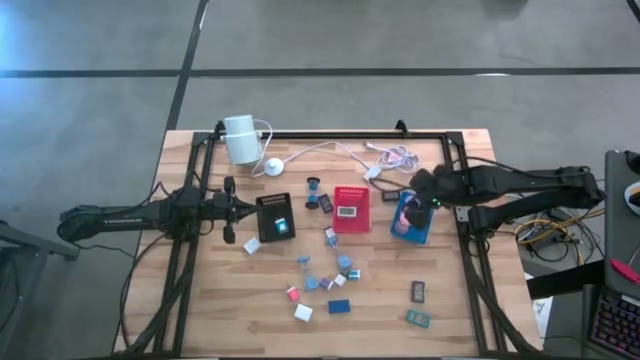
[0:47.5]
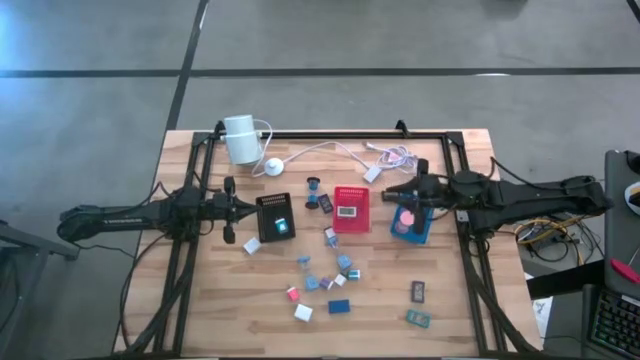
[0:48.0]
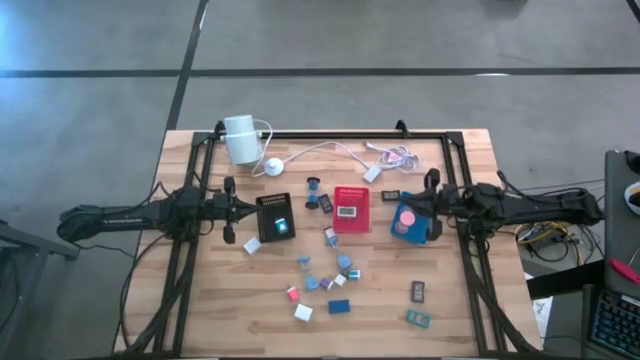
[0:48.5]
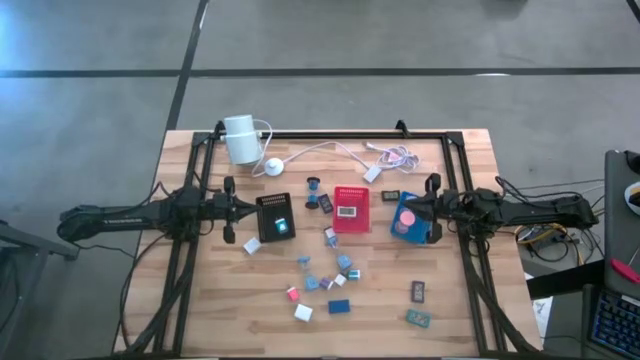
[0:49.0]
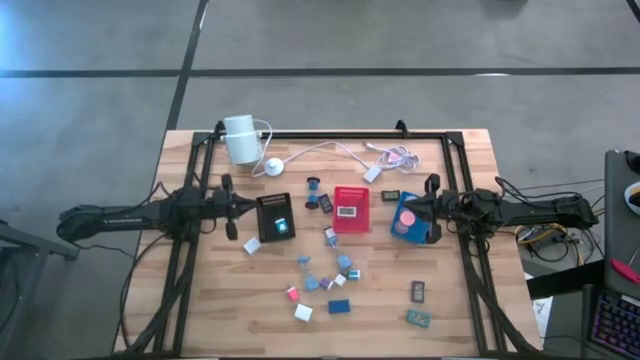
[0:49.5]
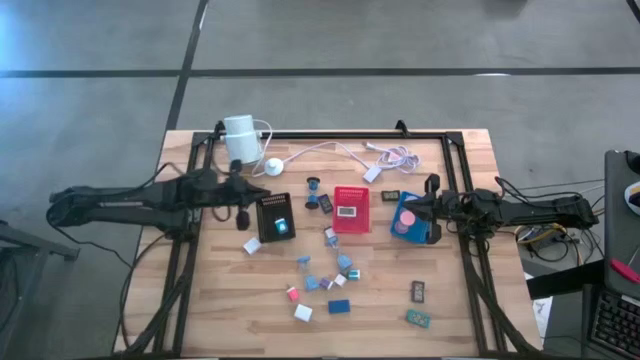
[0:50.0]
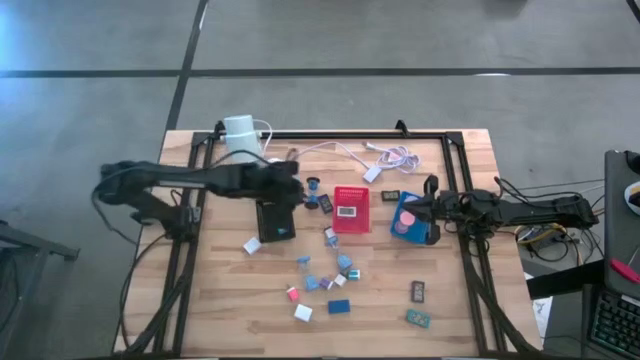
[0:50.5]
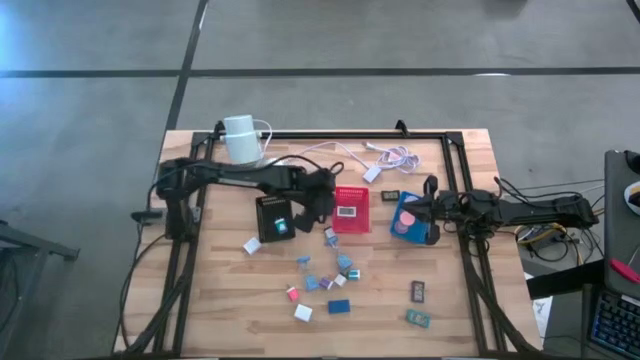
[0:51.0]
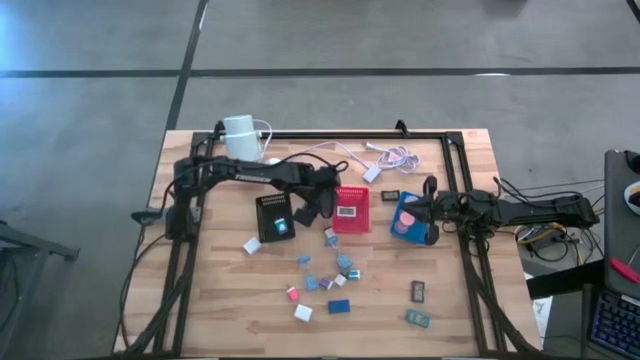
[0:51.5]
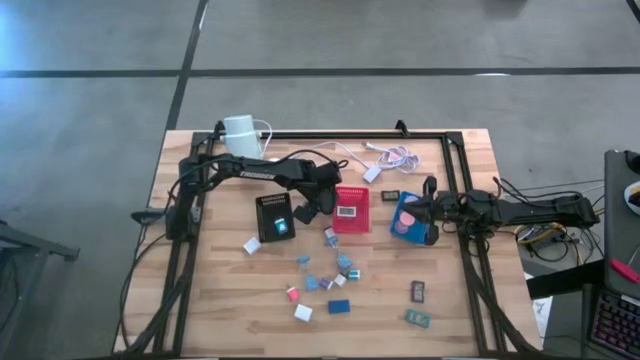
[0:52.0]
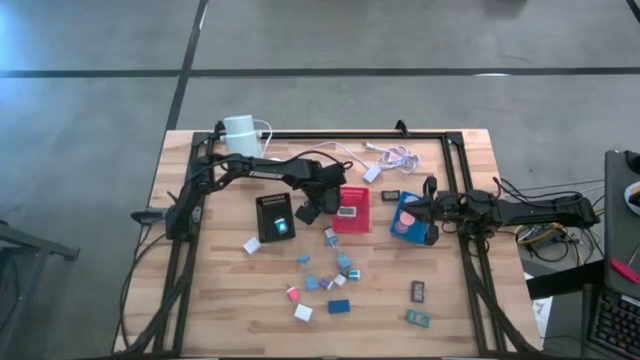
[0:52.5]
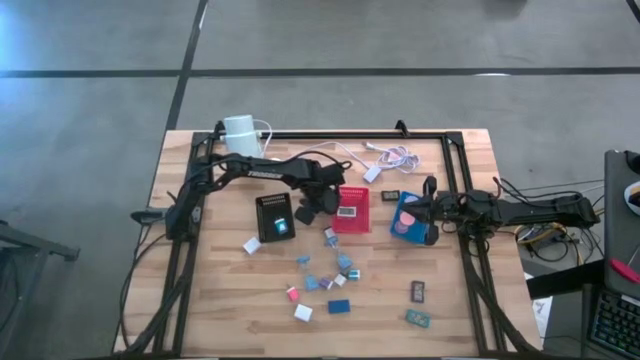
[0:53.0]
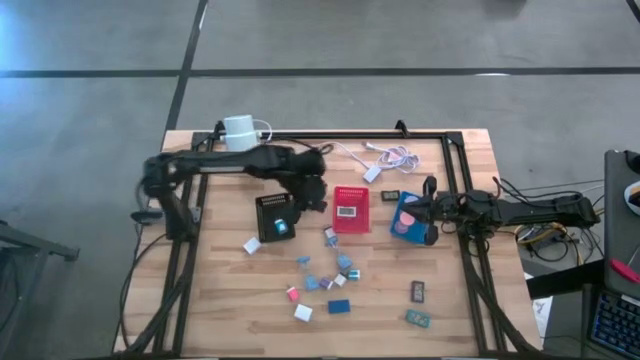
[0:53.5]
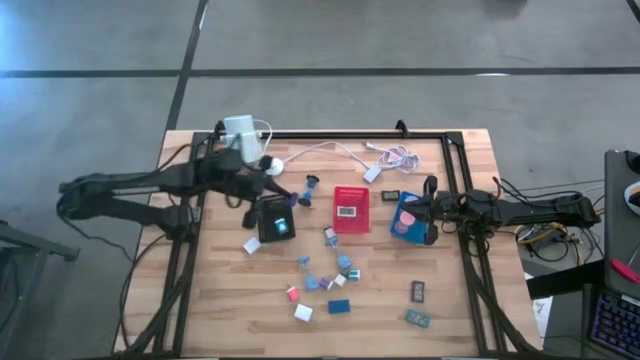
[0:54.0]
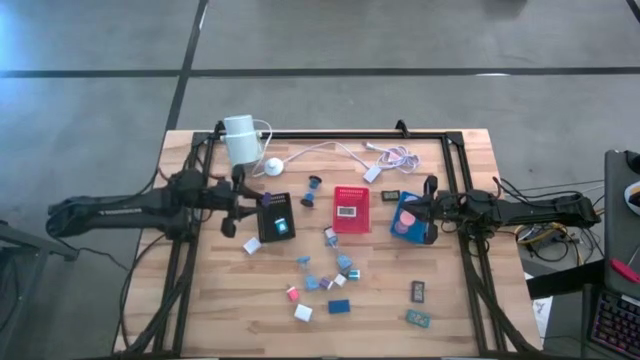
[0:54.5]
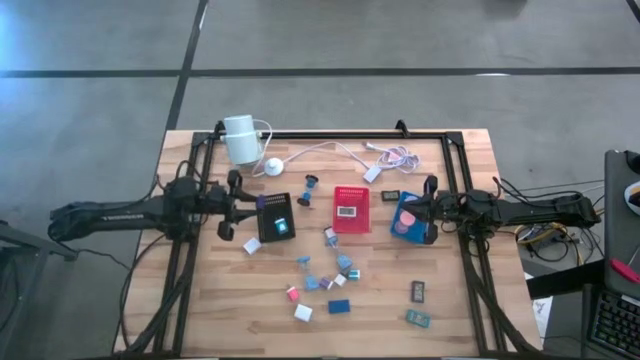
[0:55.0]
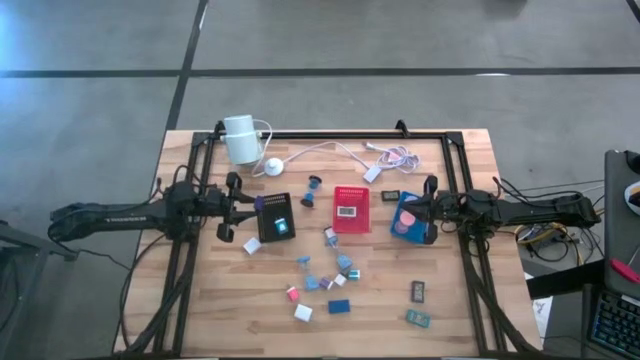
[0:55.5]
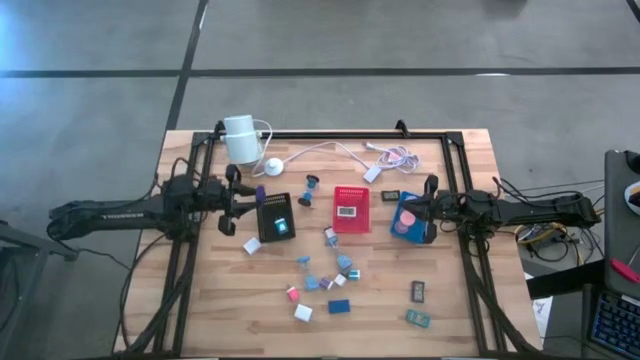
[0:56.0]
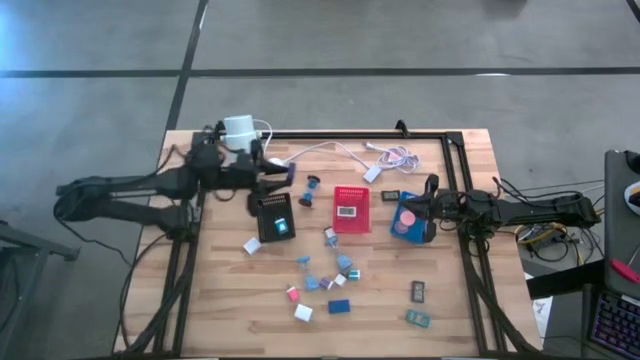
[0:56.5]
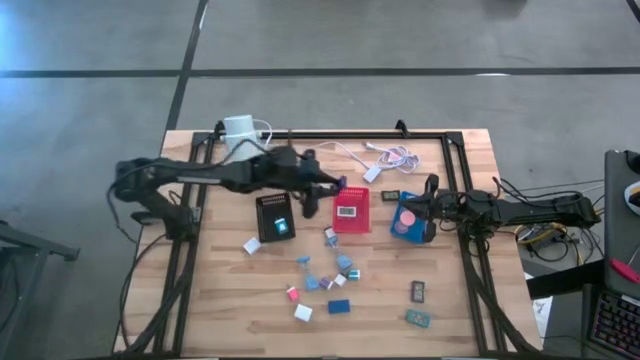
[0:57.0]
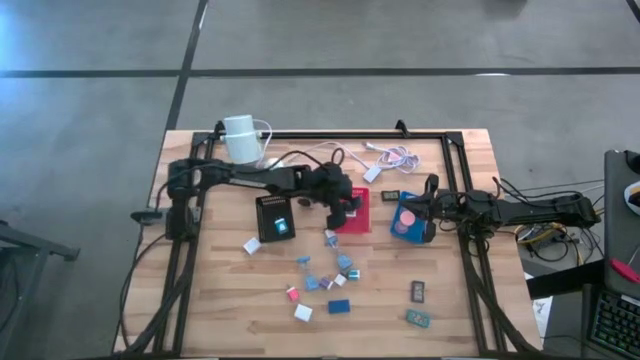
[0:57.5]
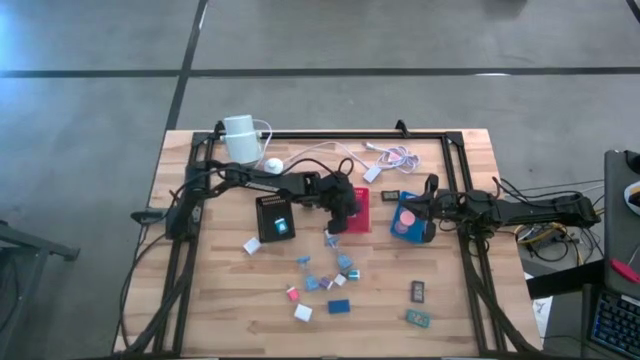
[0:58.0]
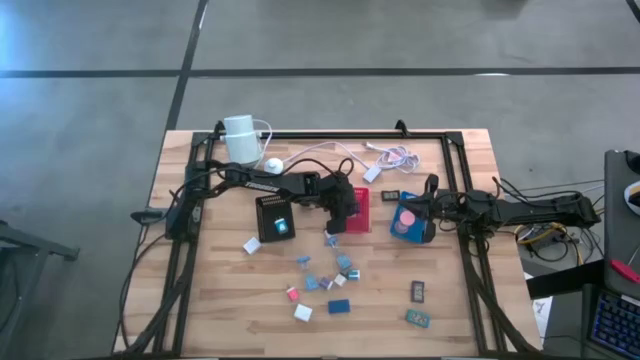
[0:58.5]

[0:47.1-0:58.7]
Task: Pick & Place Office items
Put the top dark blue digital clock into the red bin

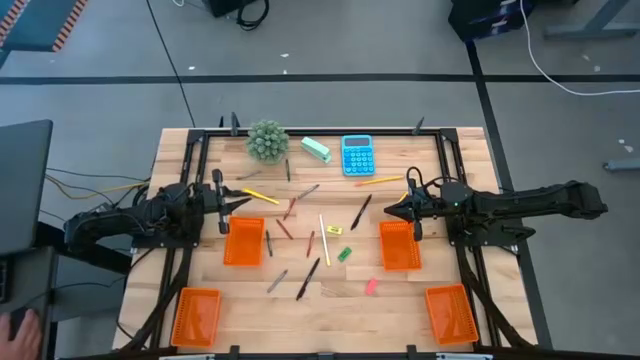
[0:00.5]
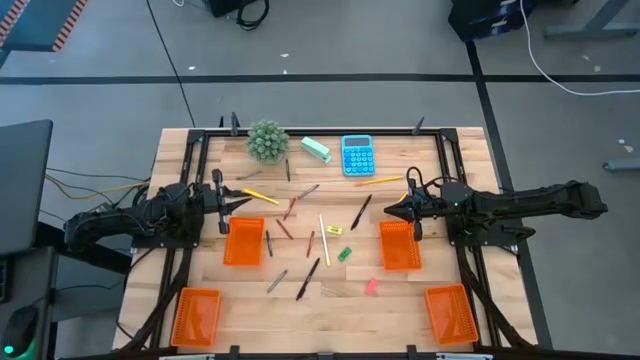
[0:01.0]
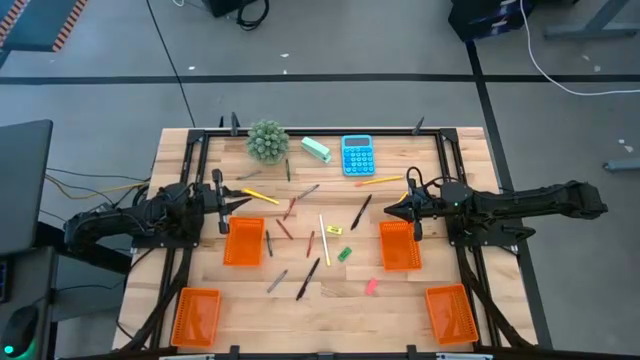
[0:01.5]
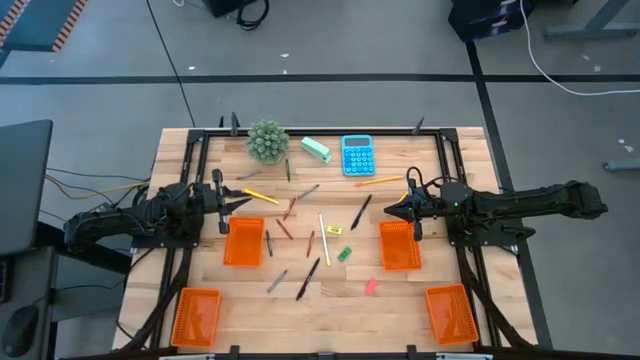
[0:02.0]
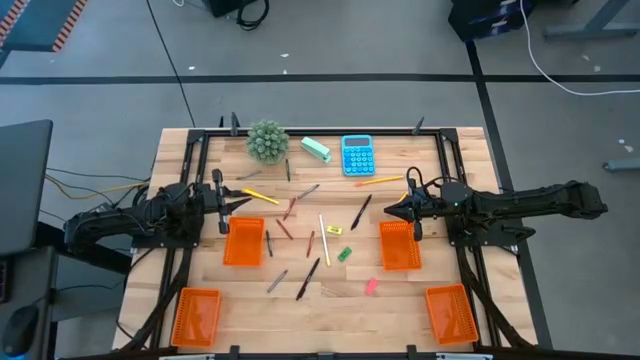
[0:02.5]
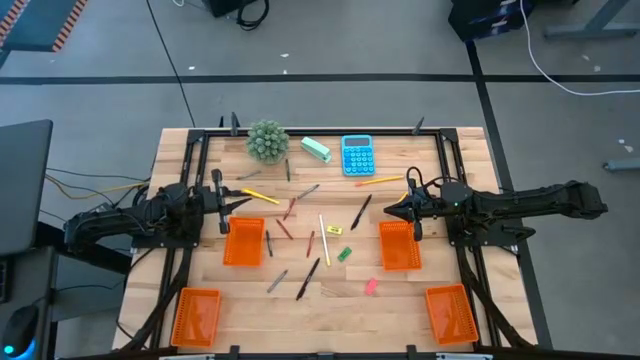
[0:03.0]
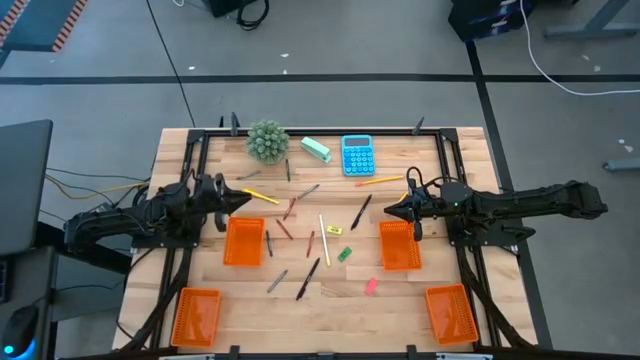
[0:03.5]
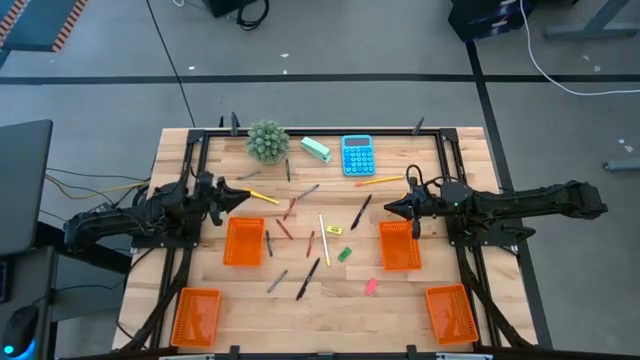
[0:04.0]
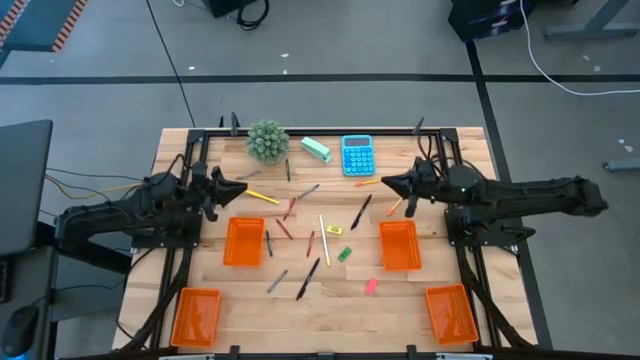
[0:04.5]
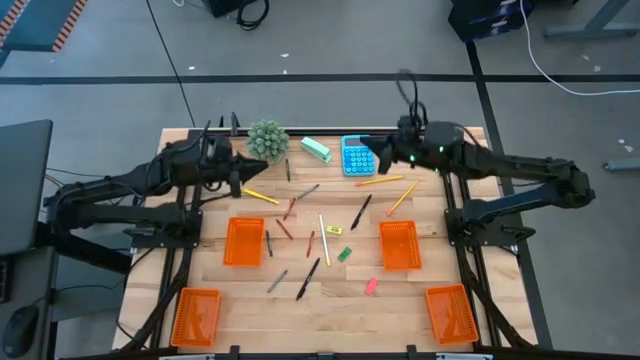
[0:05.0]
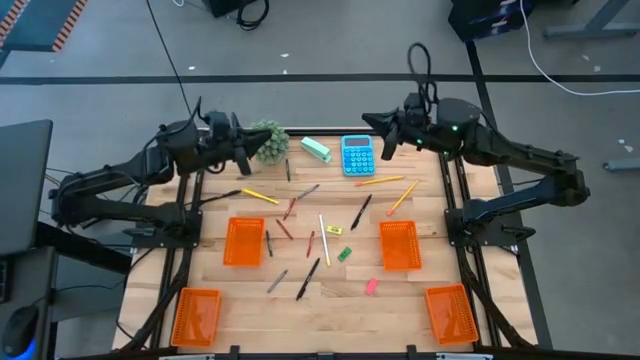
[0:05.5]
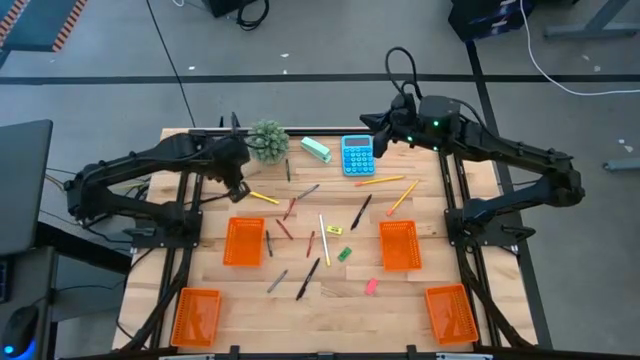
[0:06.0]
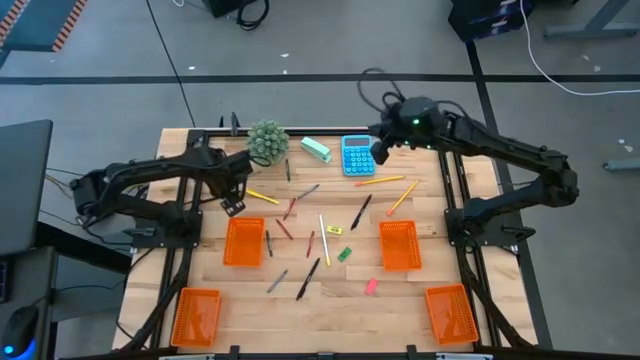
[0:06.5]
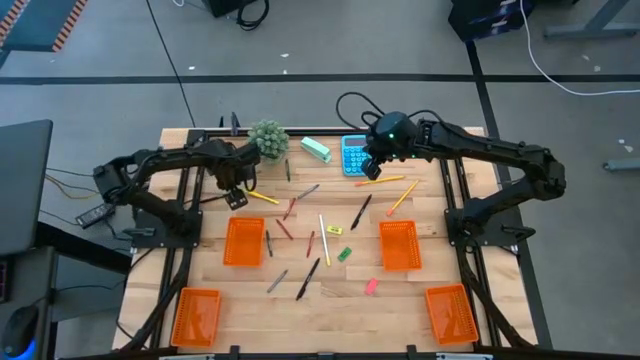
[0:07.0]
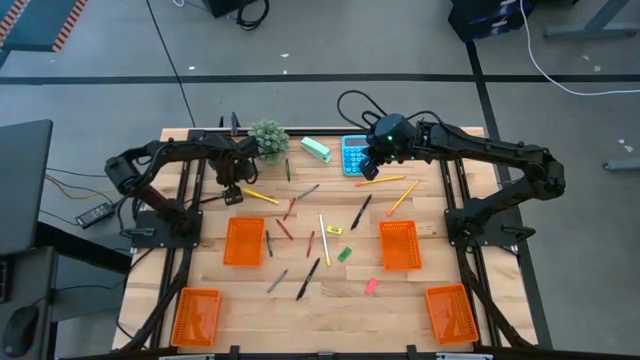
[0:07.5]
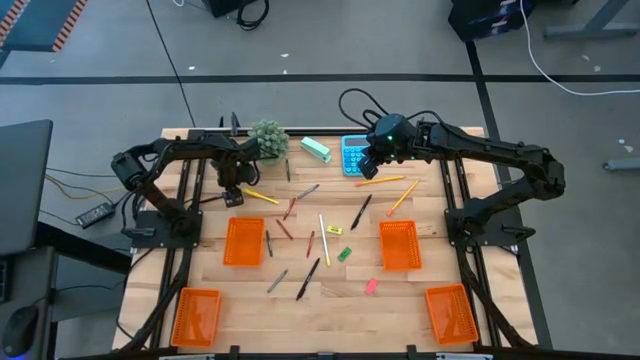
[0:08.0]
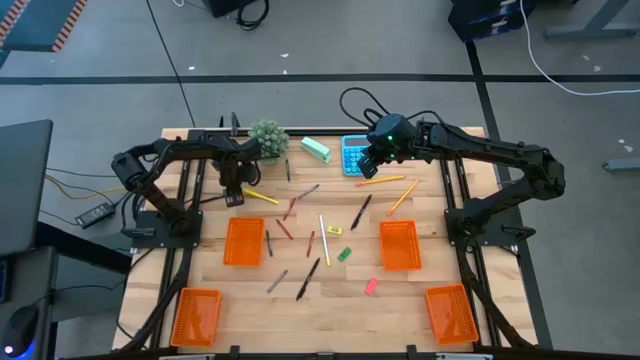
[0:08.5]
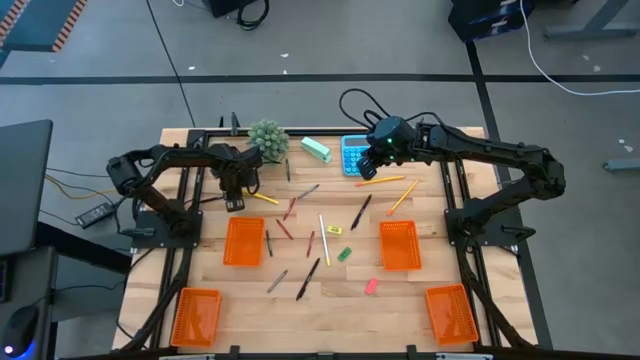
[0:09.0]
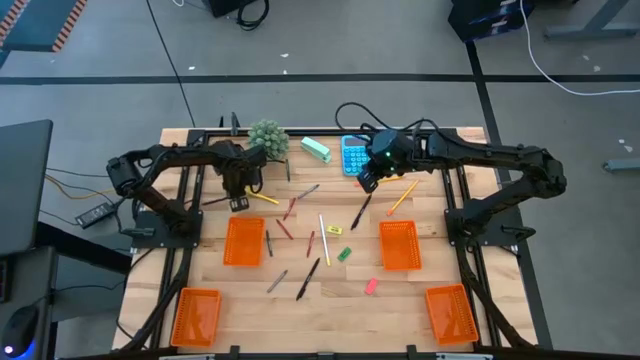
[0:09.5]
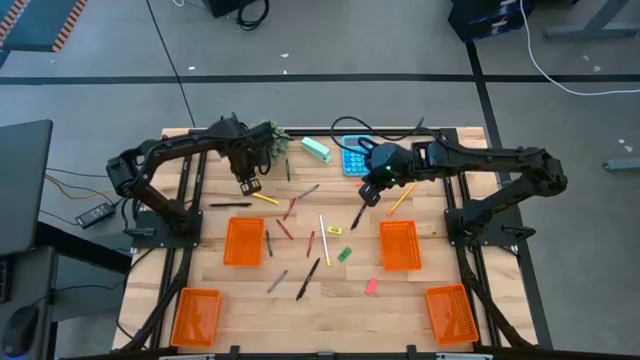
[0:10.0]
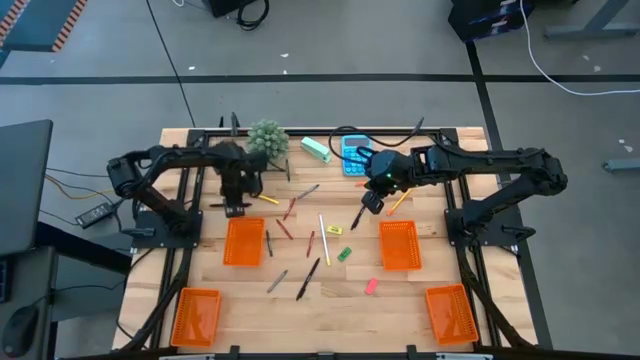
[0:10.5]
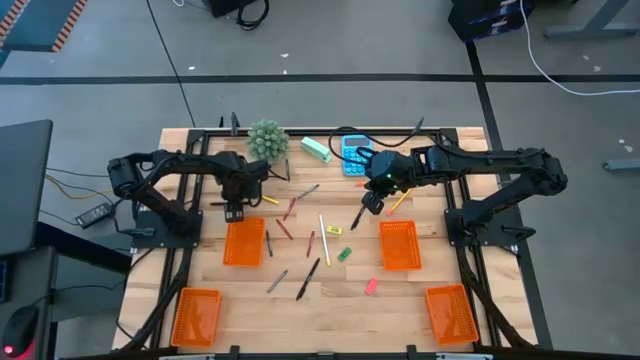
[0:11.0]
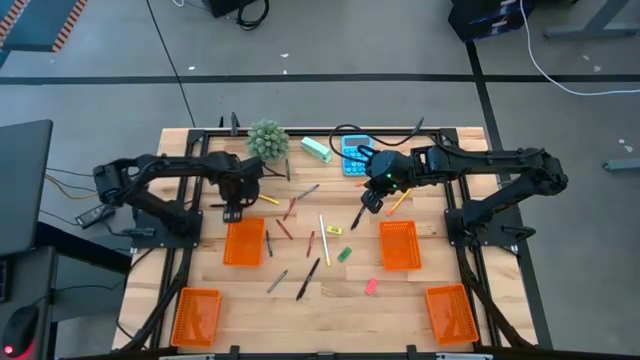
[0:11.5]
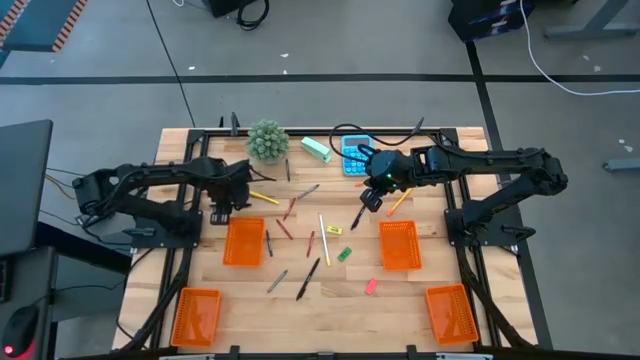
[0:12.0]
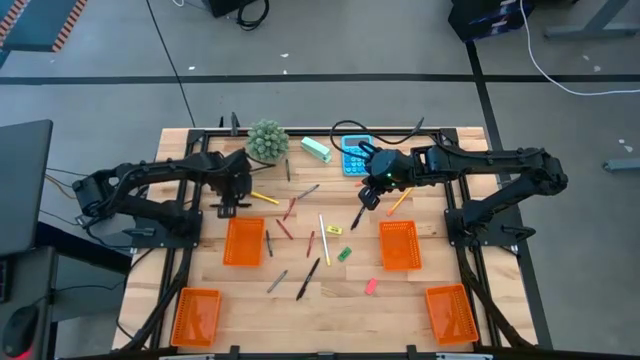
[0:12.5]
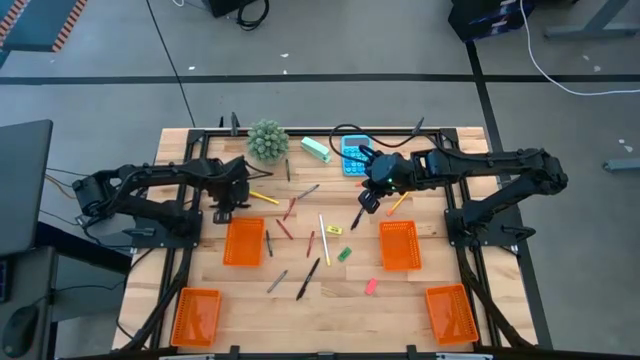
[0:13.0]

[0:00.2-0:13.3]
Task: Sort crayons/erasers/pens/pencils in bins
Put the top left black pen into the top left orange basket
